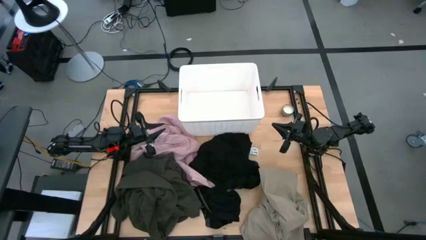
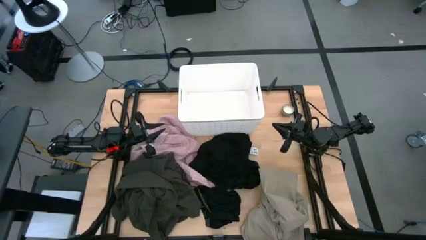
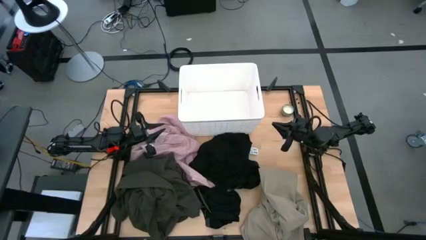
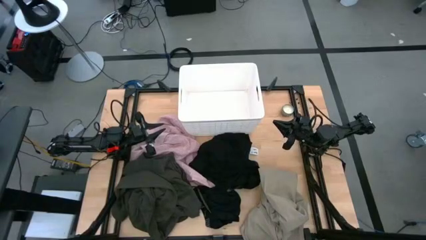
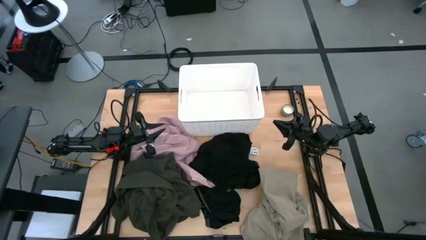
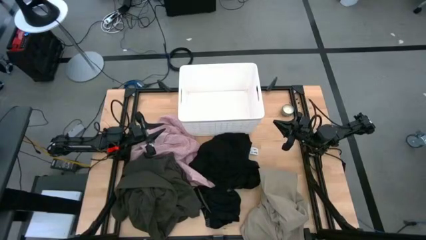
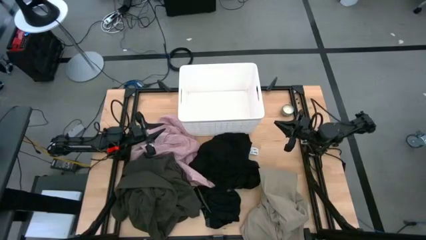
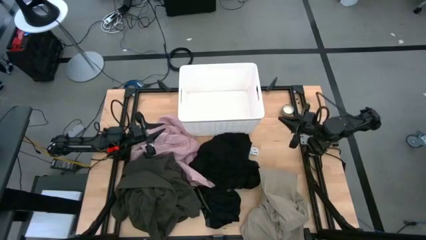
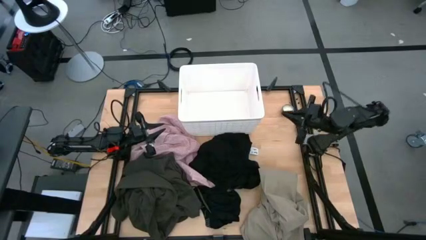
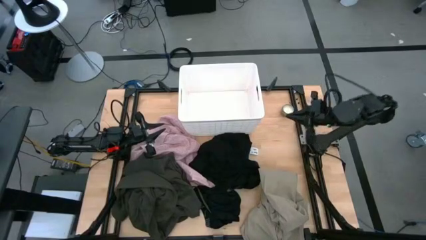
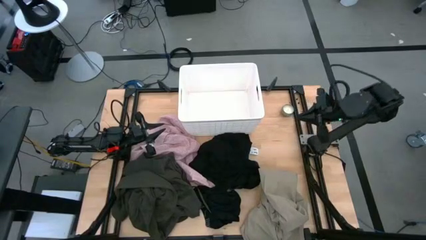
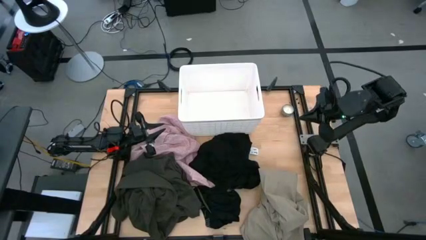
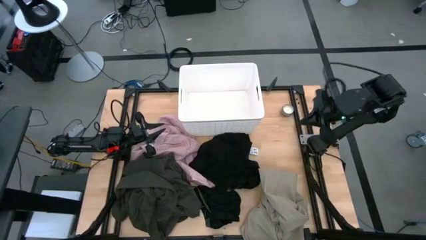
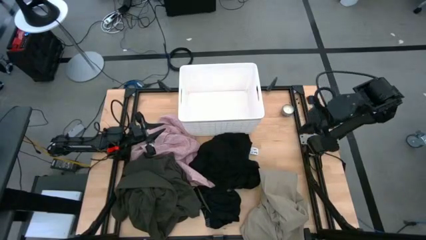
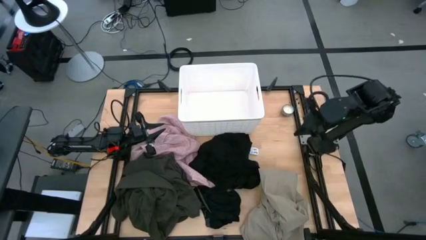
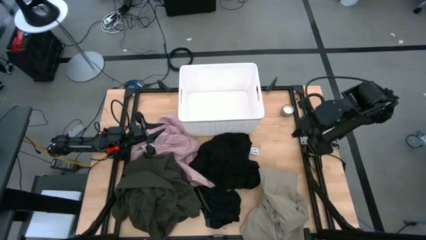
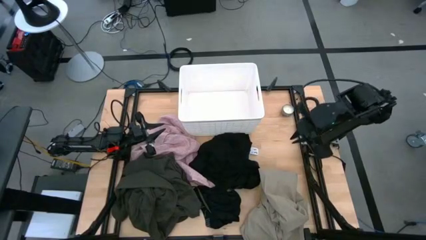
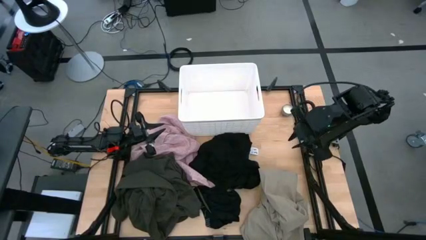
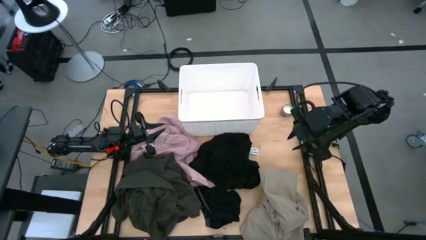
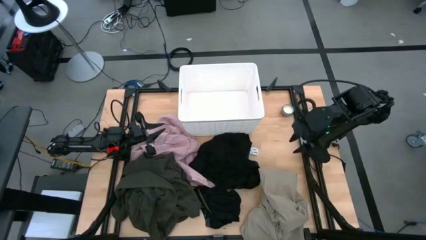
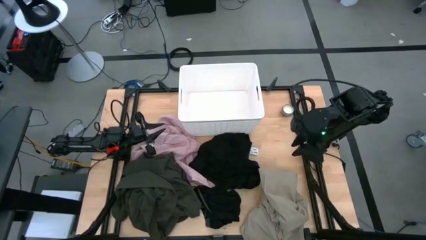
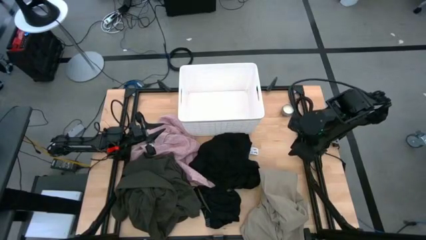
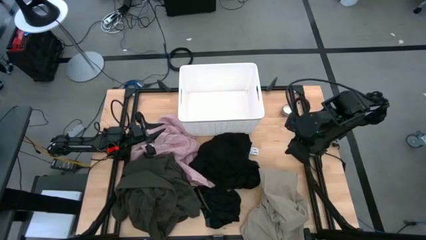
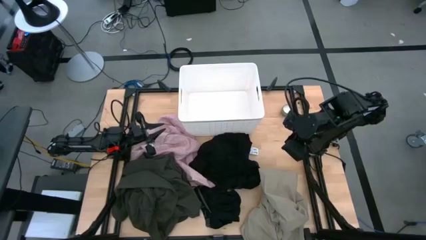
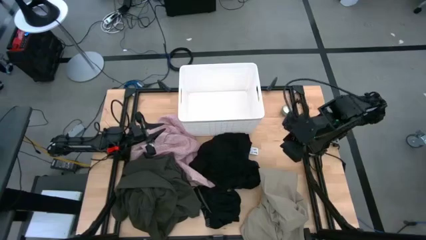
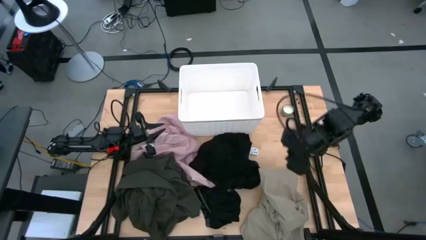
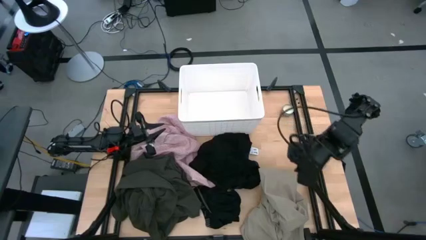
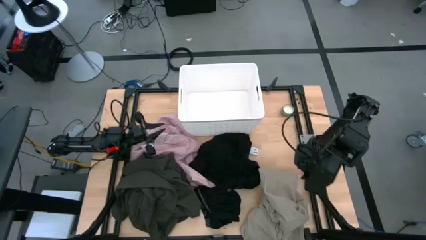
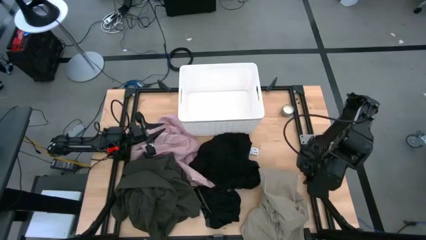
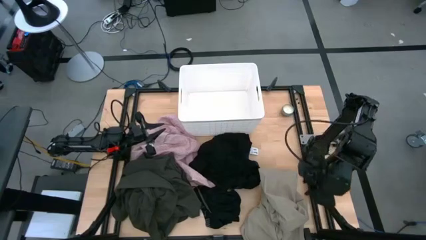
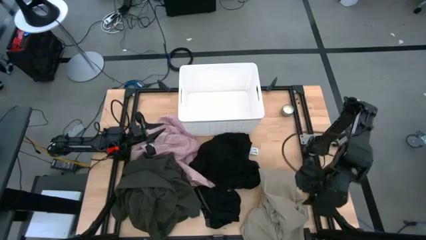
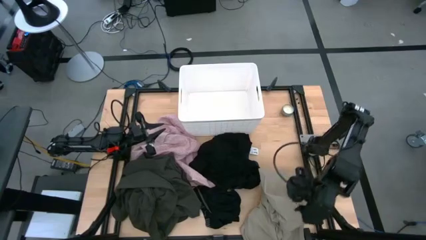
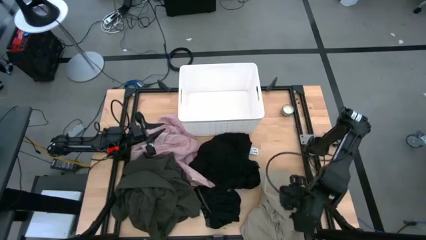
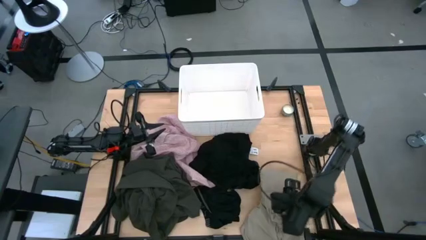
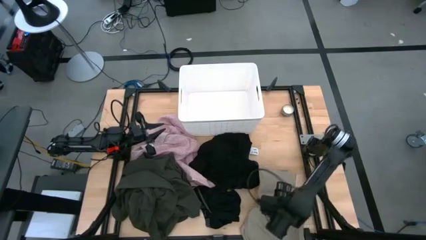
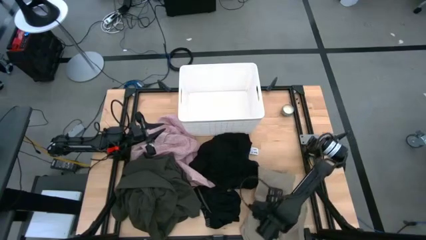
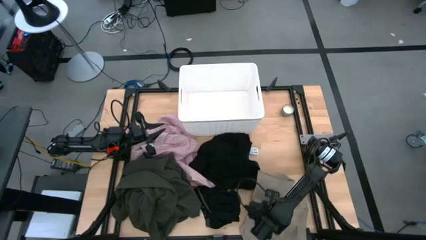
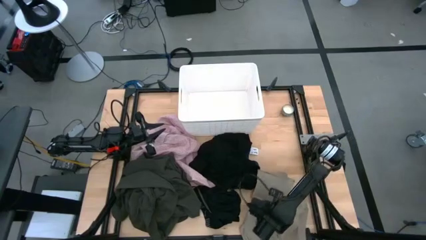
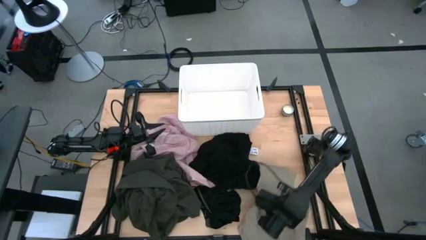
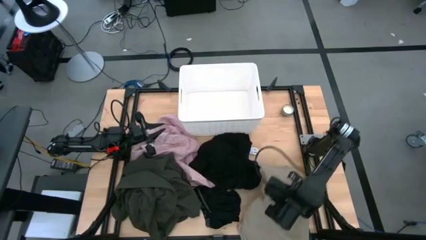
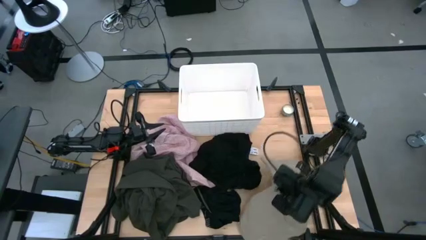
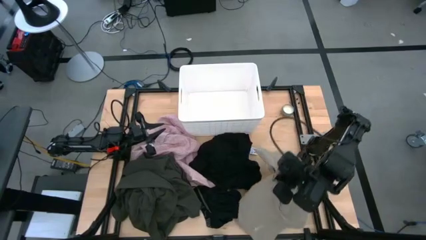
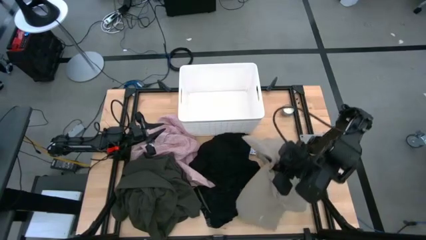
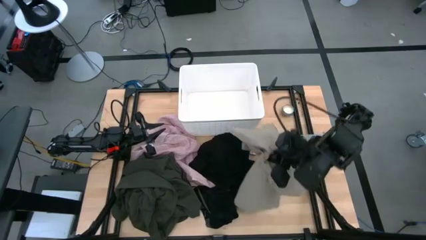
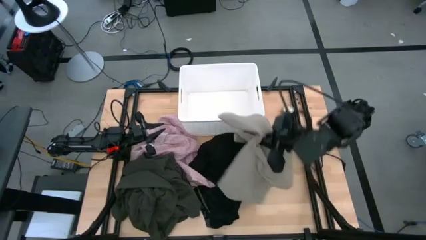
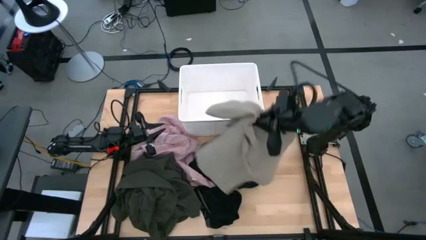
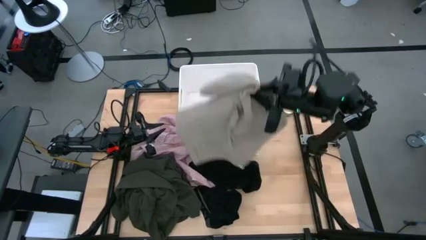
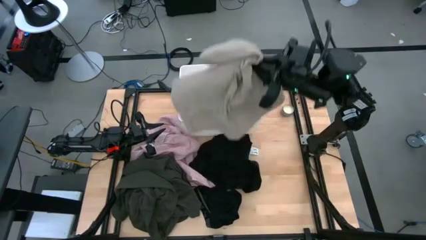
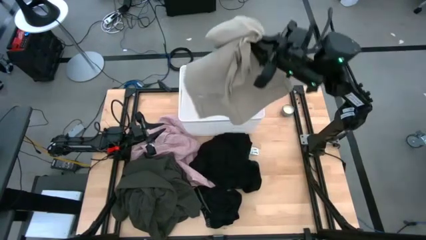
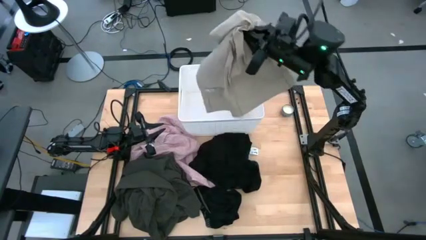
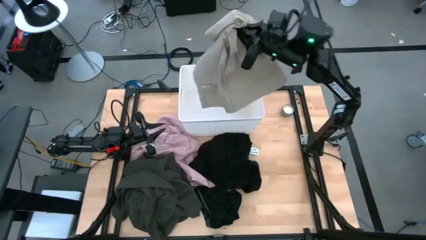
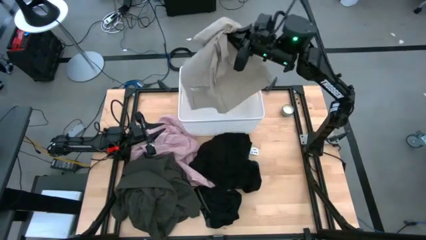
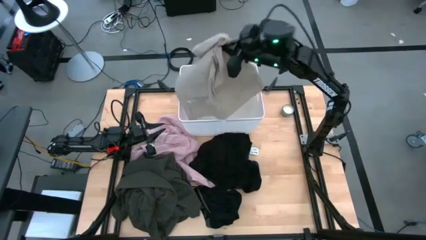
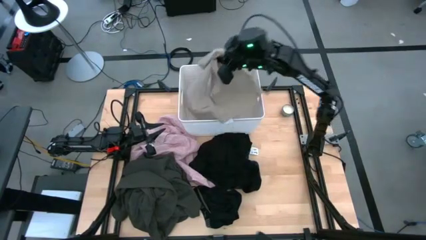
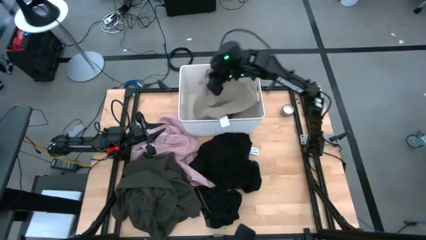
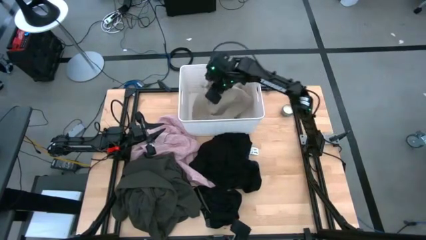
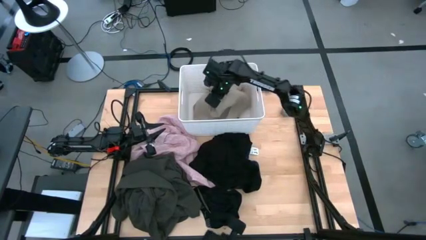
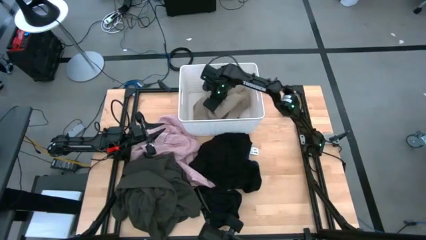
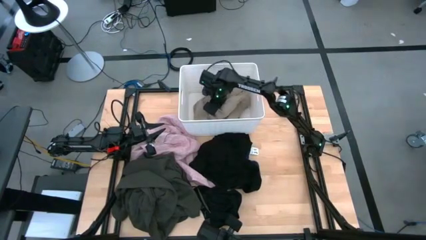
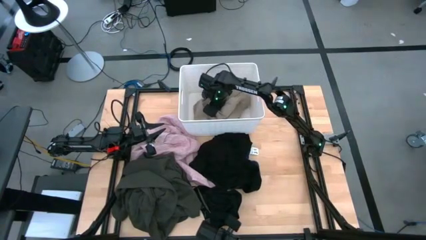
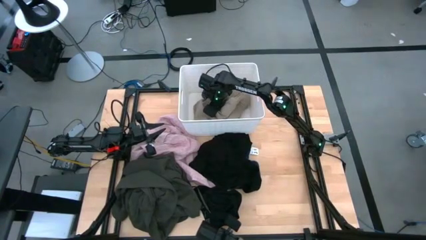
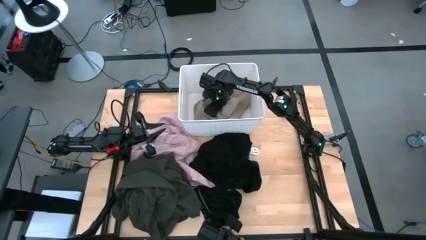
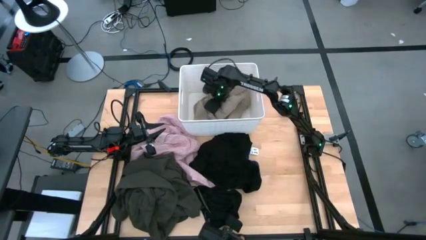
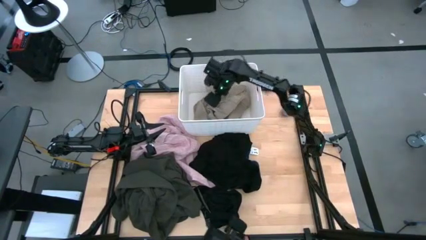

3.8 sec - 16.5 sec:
Task: Sort clothes
Put the brown pants into the white bin
